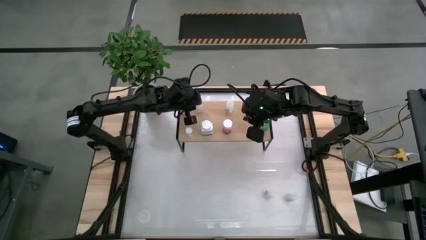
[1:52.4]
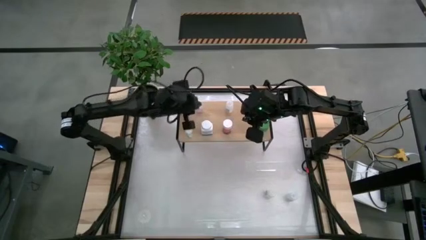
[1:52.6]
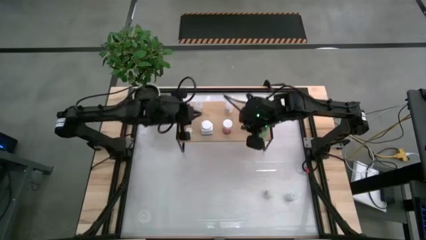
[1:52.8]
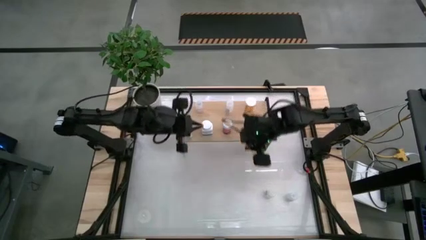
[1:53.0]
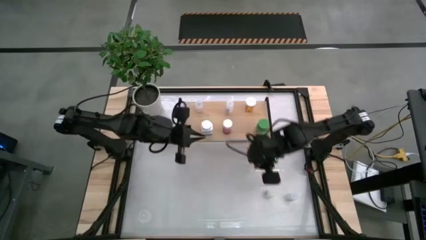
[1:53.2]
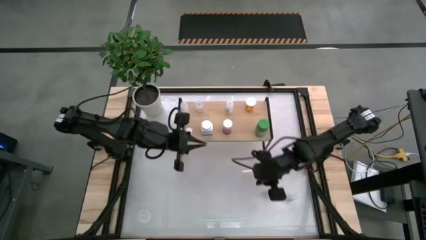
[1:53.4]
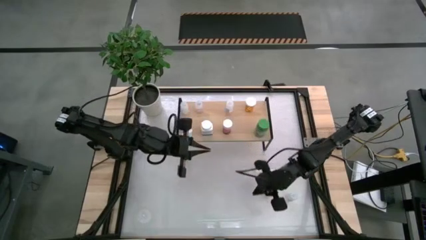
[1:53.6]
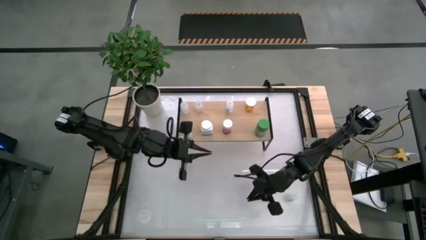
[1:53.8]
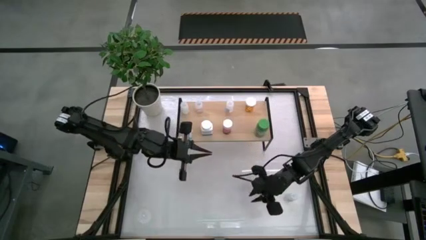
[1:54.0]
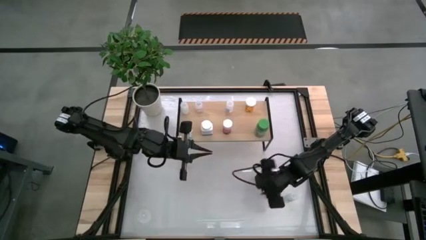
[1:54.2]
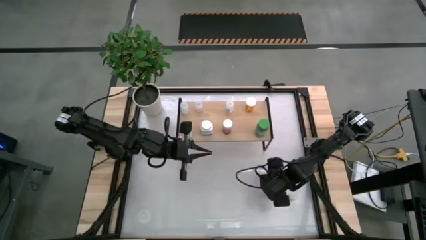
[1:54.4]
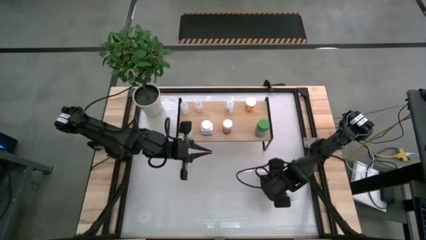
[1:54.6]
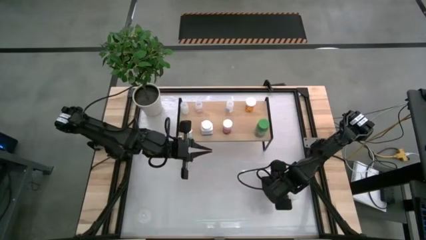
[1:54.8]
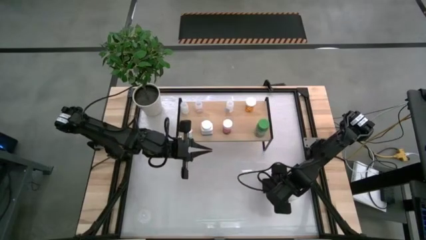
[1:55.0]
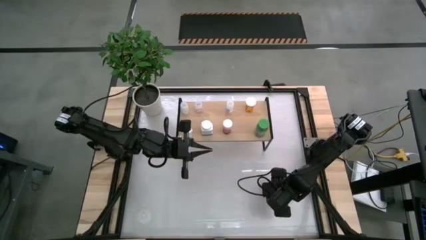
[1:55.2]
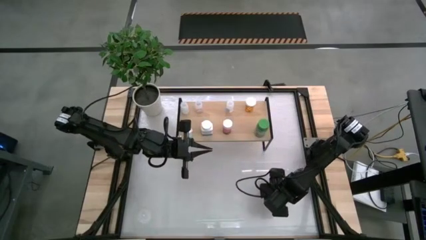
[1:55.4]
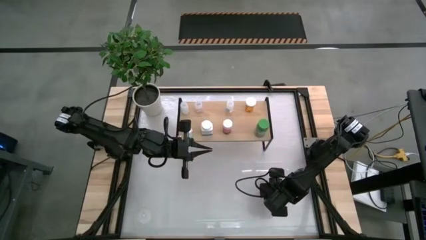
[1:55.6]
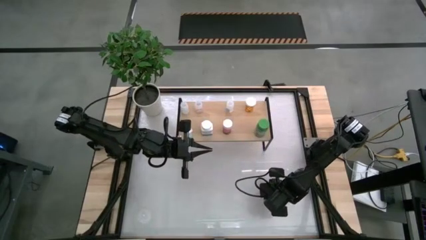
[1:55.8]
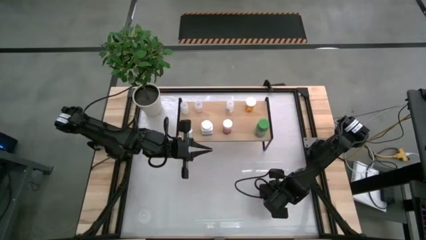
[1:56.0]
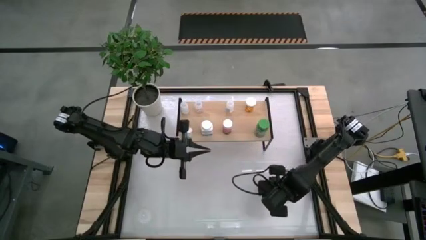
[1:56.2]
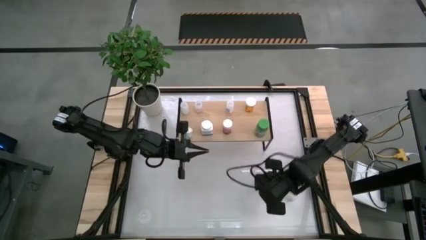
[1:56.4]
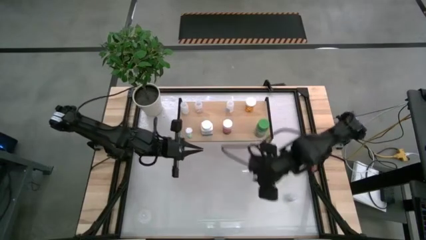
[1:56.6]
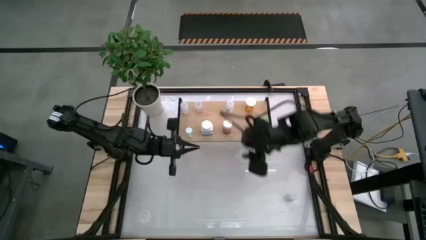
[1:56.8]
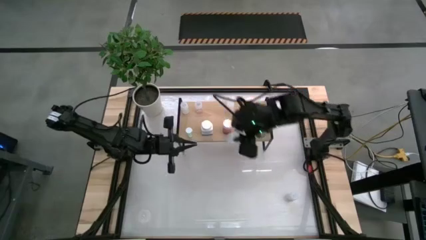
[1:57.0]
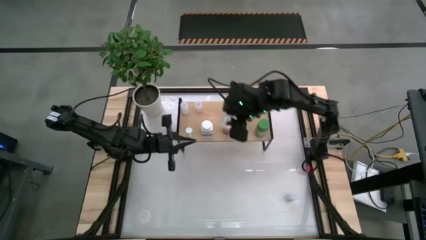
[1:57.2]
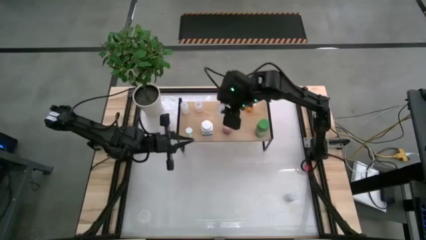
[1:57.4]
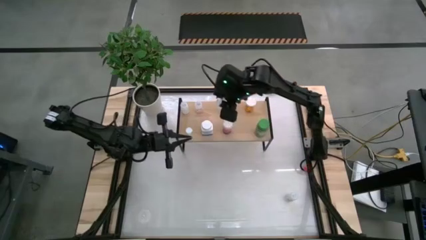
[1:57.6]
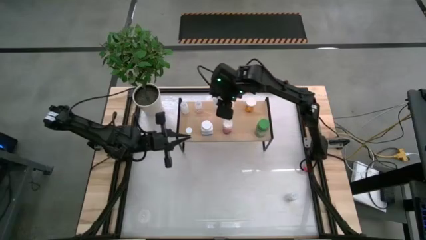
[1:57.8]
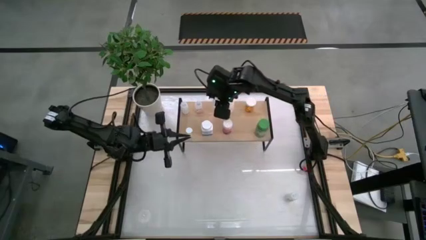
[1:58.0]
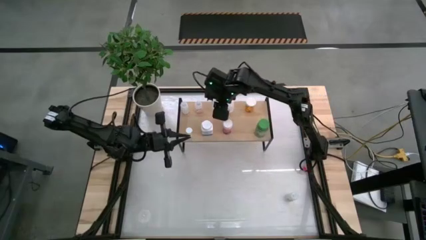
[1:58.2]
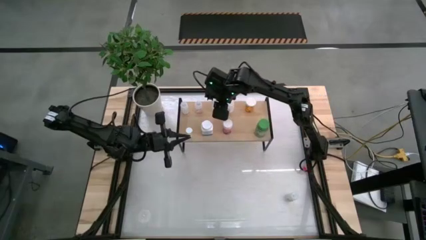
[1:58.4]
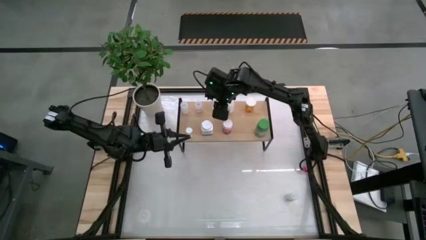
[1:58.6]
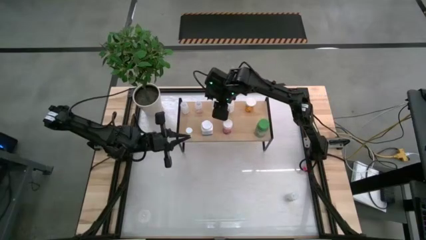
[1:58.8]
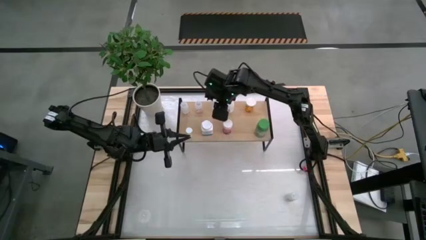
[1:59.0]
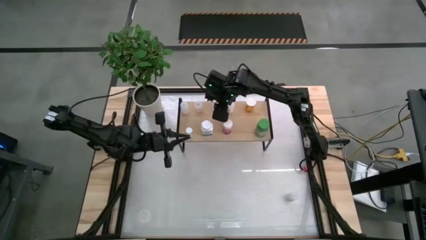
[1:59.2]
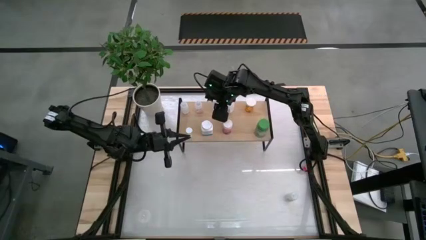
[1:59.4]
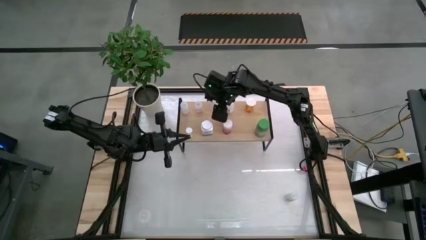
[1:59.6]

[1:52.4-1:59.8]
Task: Pick and place medicine bottles onto shelf by color
Put the transparent pill bottle on the shelf

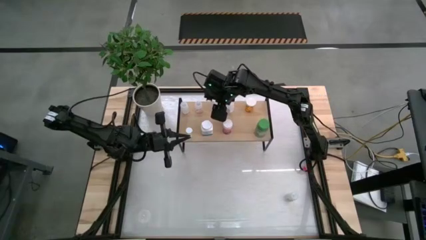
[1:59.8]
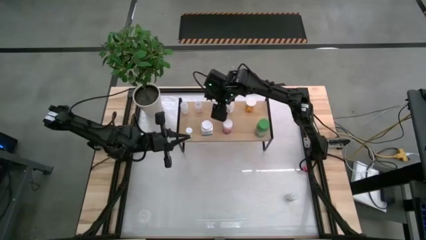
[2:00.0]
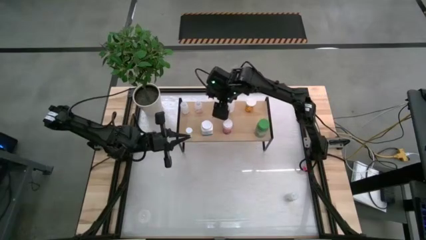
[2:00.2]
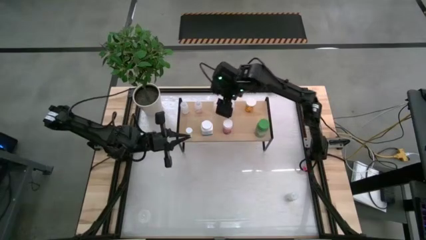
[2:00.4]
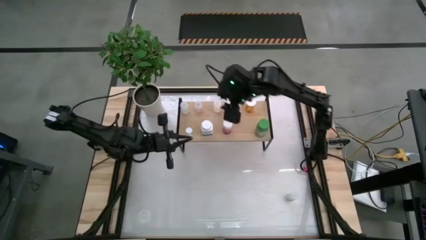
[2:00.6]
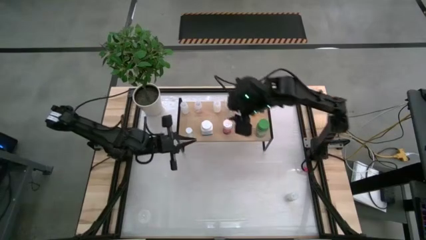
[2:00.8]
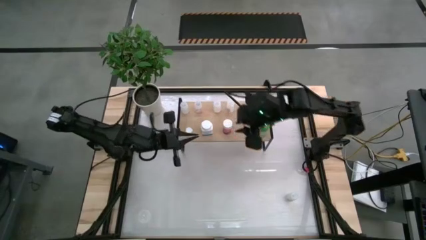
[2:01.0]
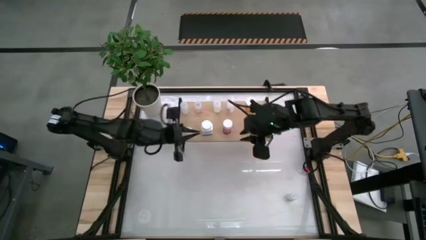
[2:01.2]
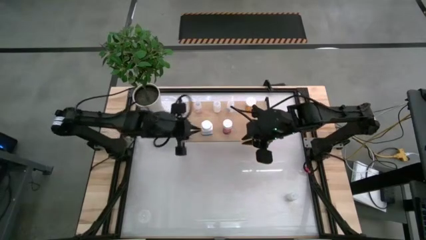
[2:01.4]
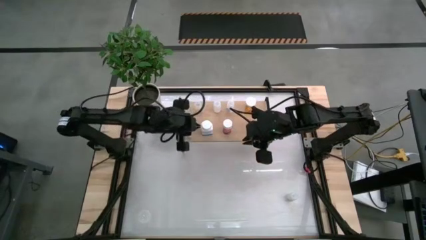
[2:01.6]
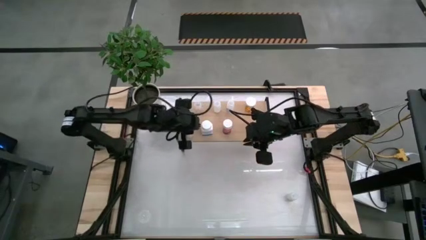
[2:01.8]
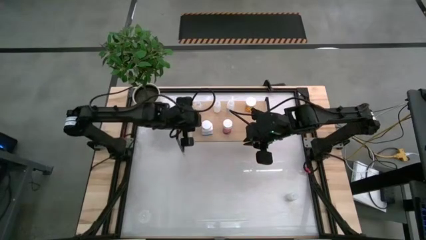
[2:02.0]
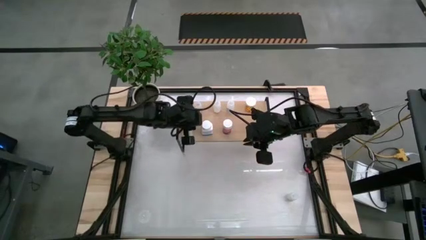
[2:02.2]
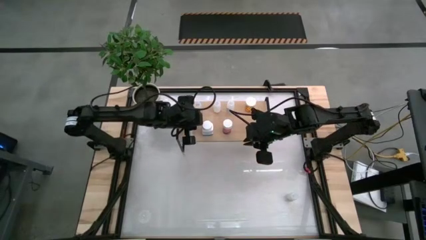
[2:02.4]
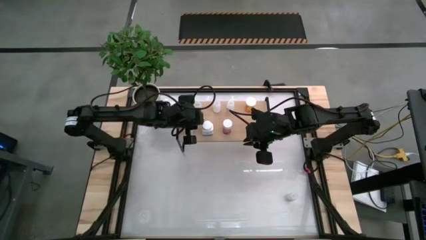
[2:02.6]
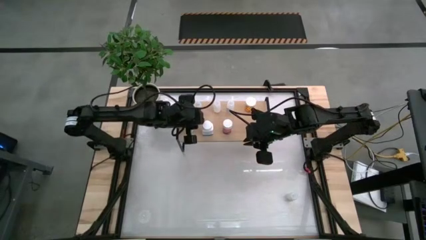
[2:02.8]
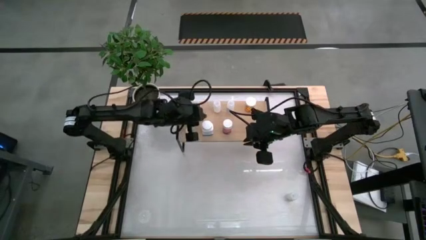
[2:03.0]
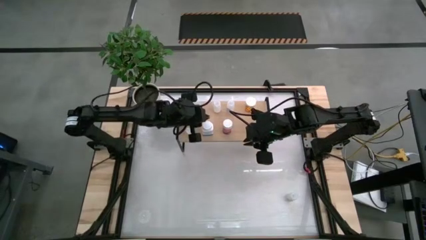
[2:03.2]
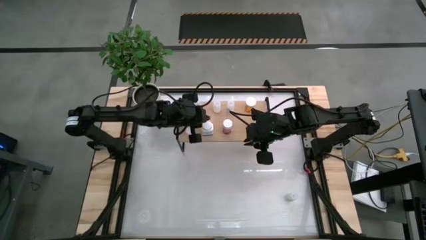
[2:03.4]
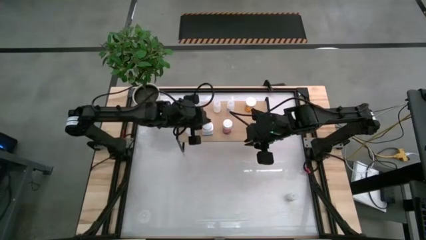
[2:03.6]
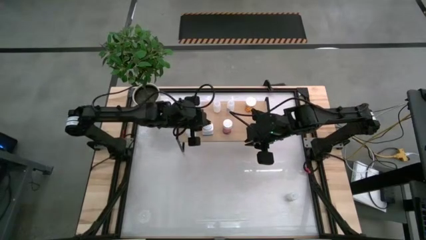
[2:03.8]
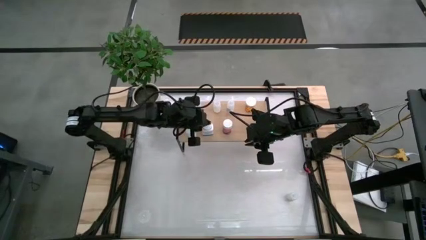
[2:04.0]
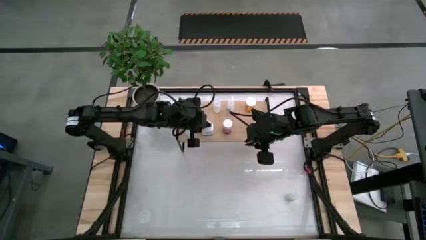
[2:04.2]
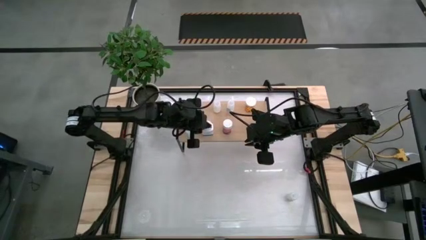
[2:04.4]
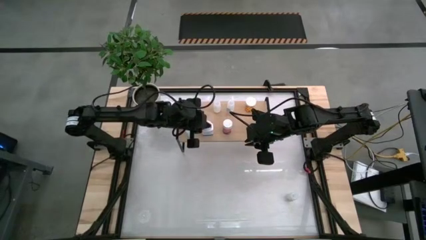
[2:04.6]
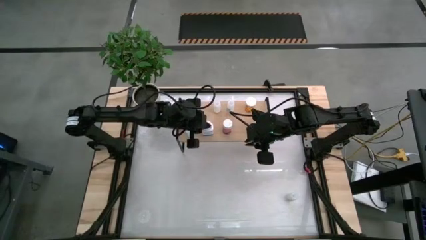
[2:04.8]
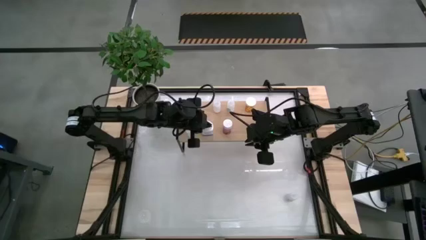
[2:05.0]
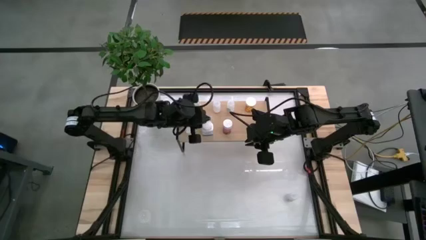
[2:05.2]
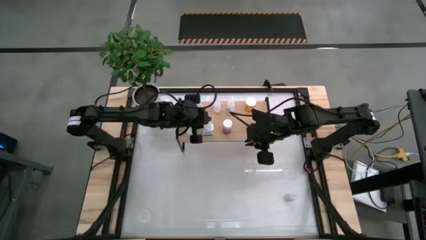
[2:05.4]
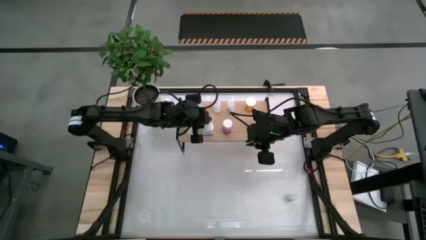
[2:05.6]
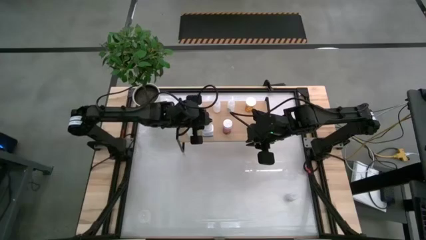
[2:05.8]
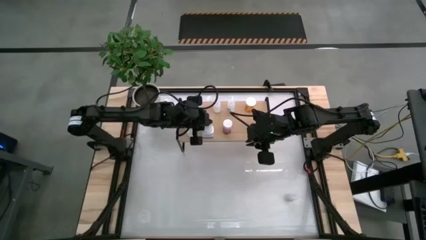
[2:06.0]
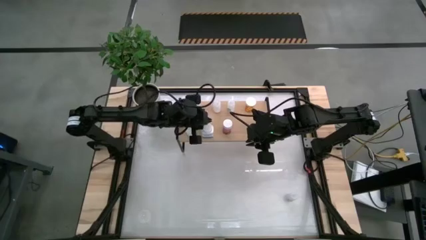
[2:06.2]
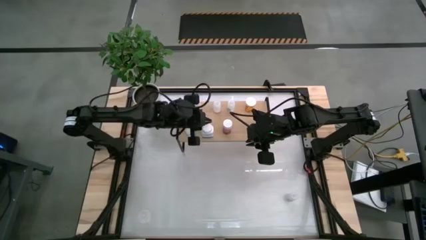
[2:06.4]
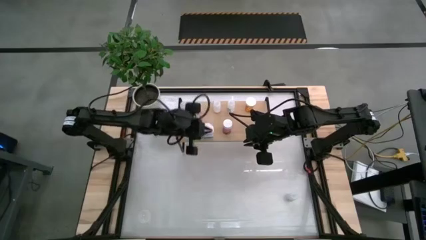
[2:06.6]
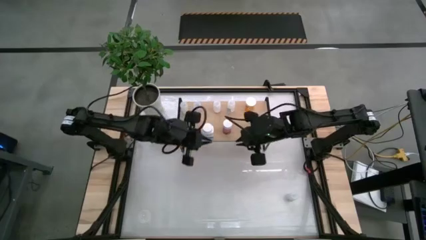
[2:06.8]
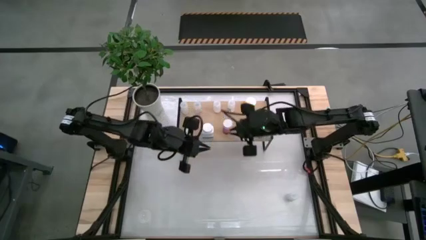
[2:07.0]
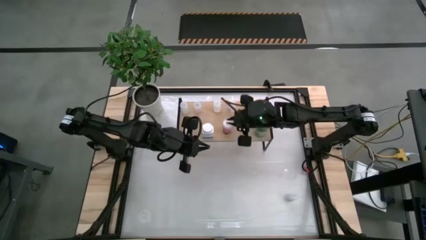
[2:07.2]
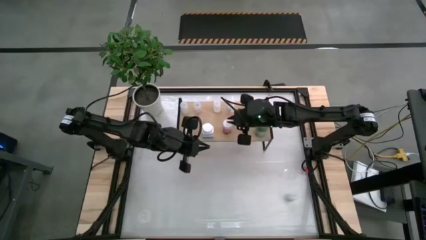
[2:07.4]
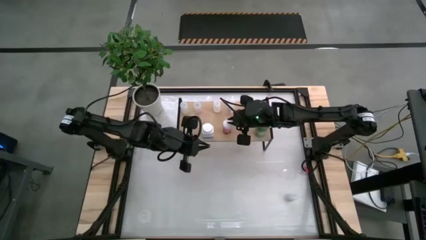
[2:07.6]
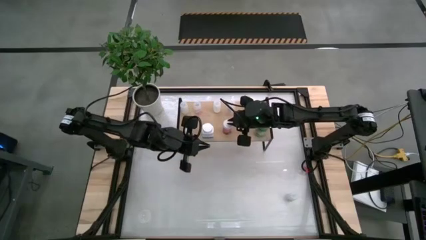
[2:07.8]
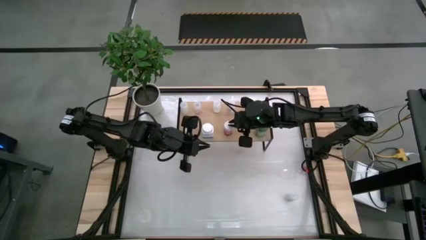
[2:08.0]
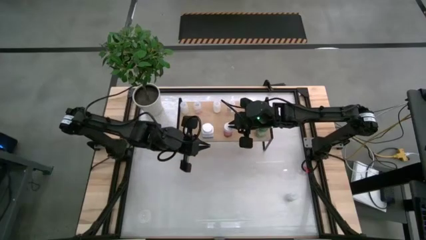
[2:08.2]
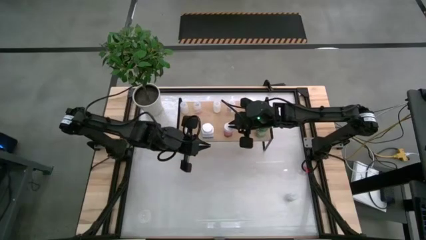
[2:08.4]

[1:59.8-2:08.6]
Adjust the pill bottles on the shelf
